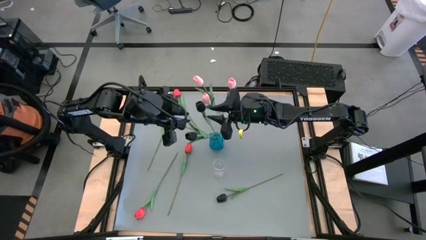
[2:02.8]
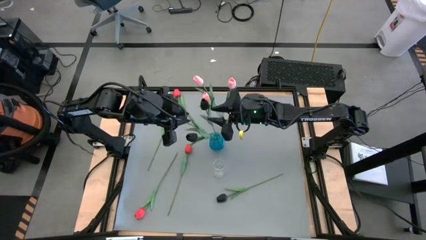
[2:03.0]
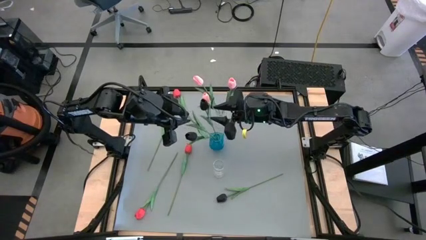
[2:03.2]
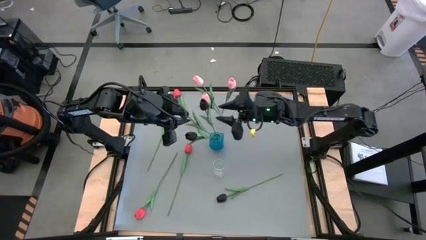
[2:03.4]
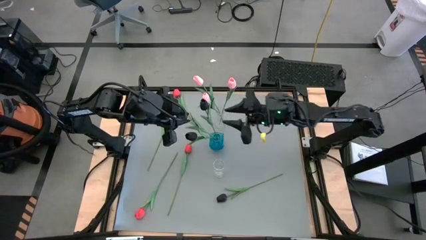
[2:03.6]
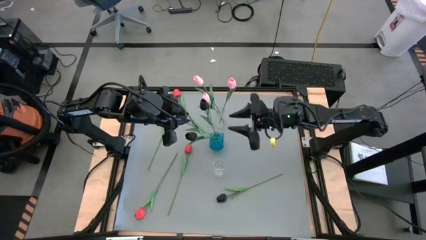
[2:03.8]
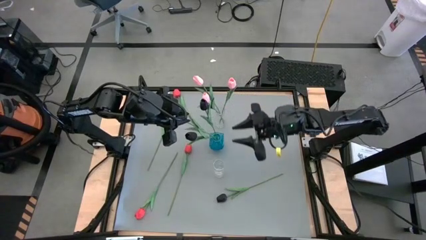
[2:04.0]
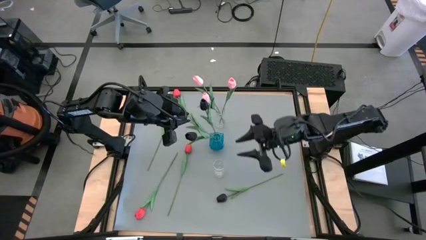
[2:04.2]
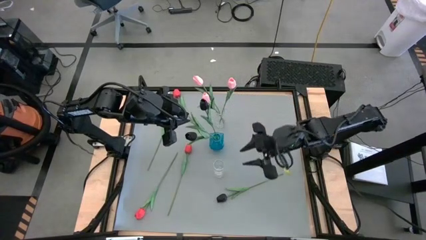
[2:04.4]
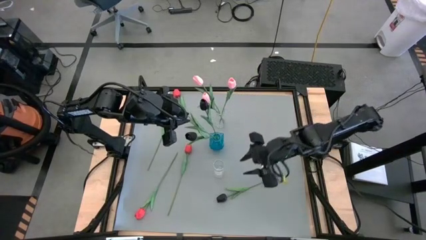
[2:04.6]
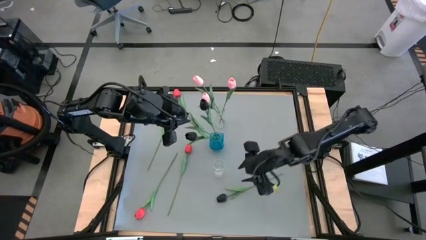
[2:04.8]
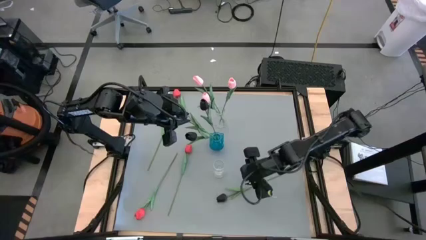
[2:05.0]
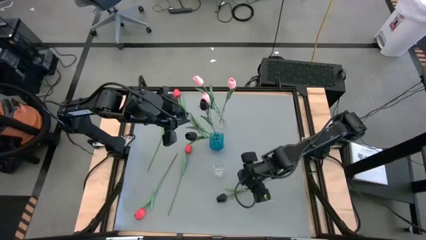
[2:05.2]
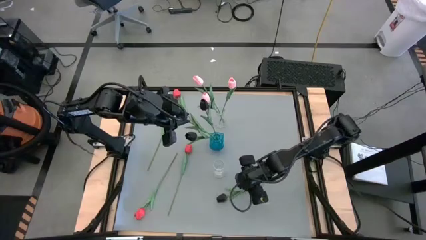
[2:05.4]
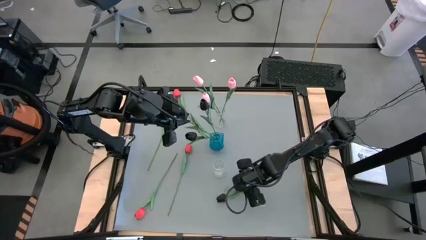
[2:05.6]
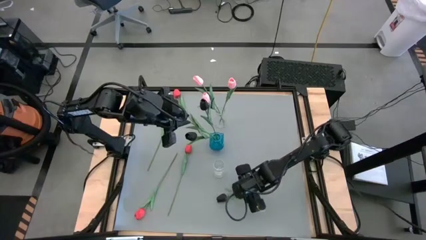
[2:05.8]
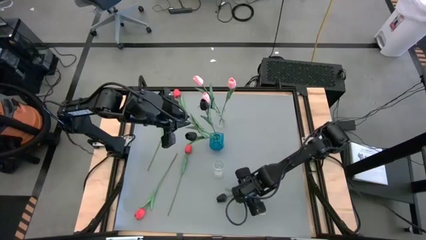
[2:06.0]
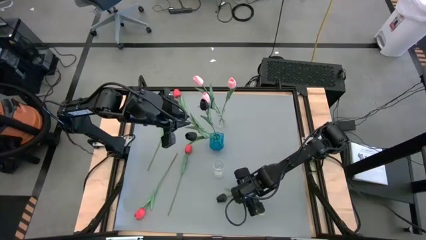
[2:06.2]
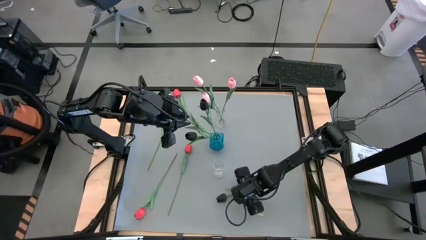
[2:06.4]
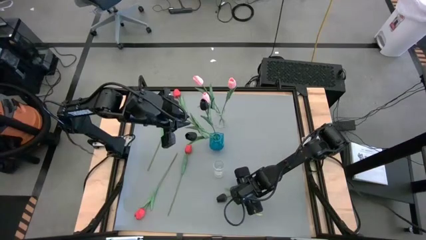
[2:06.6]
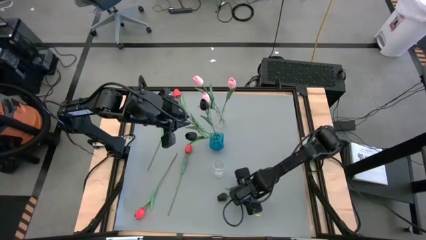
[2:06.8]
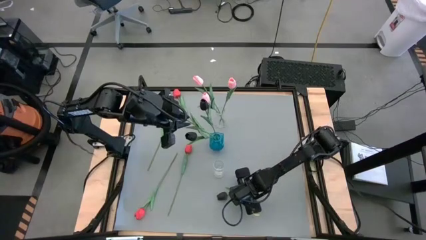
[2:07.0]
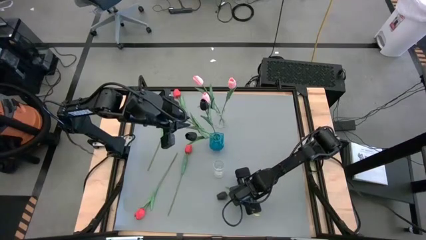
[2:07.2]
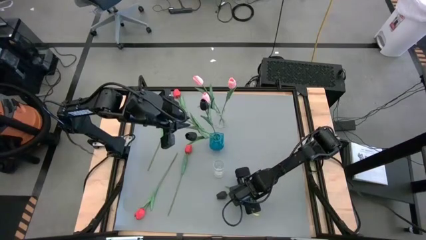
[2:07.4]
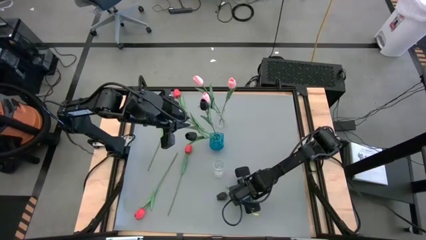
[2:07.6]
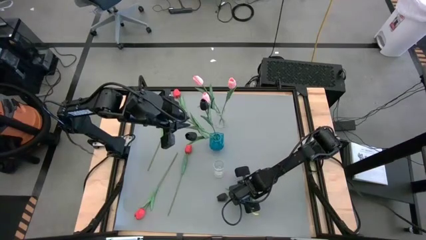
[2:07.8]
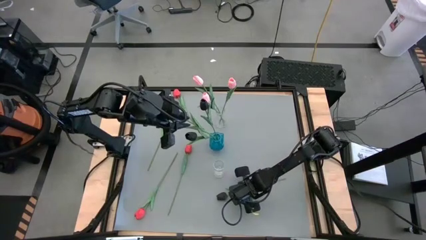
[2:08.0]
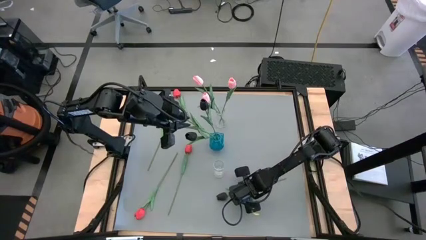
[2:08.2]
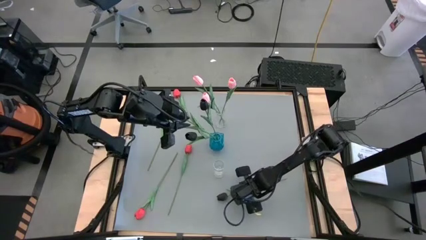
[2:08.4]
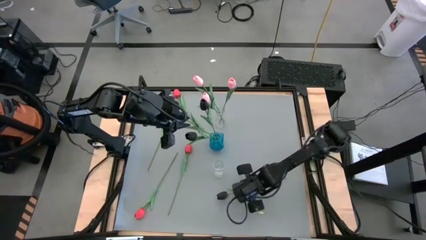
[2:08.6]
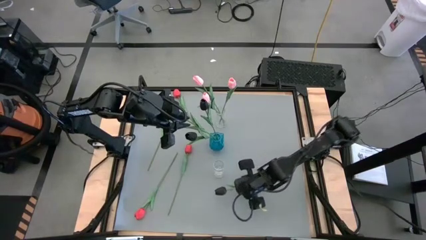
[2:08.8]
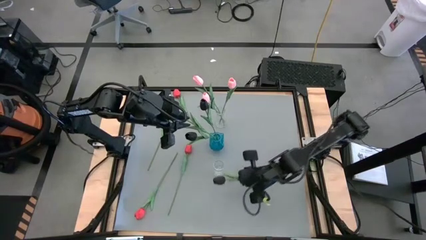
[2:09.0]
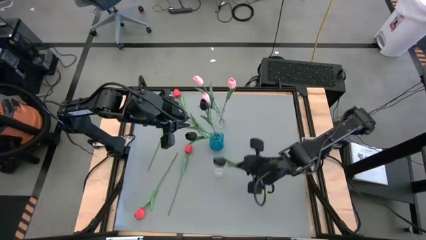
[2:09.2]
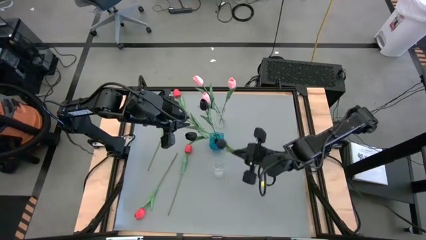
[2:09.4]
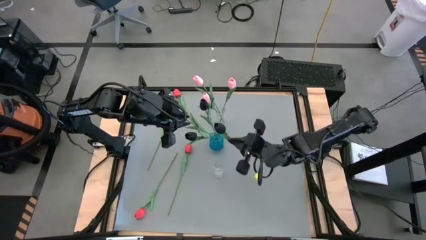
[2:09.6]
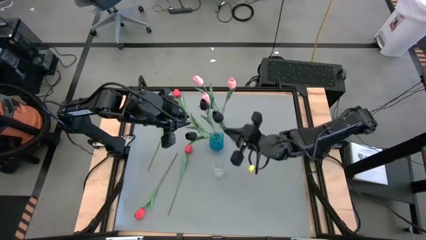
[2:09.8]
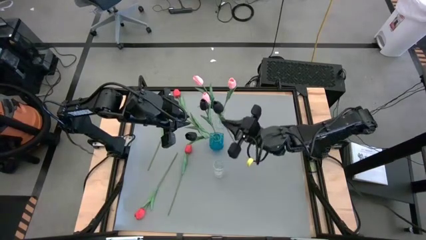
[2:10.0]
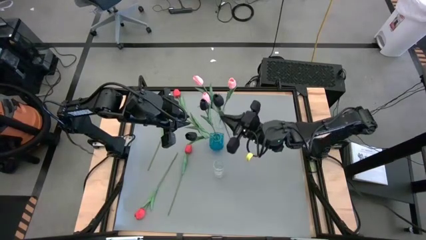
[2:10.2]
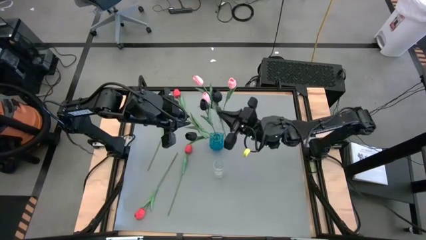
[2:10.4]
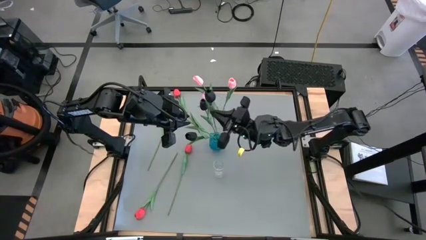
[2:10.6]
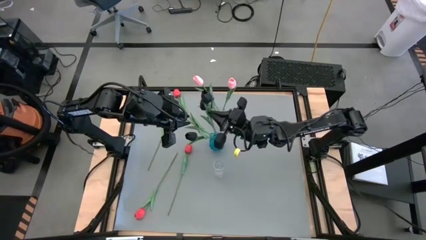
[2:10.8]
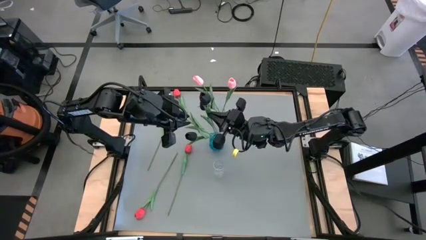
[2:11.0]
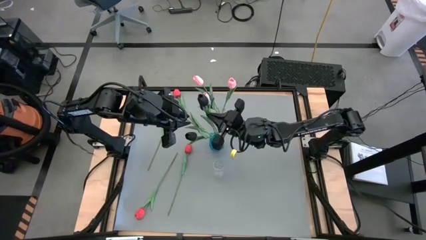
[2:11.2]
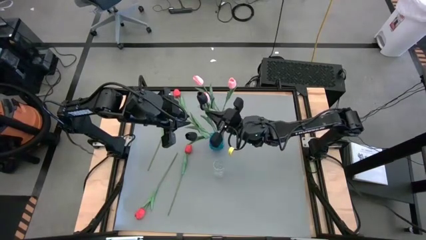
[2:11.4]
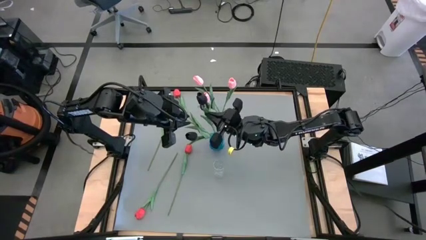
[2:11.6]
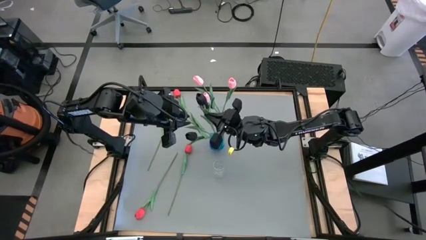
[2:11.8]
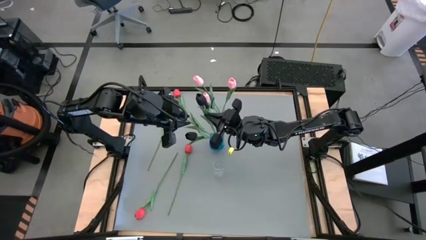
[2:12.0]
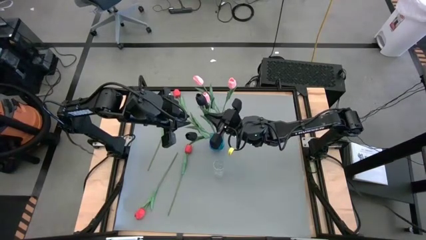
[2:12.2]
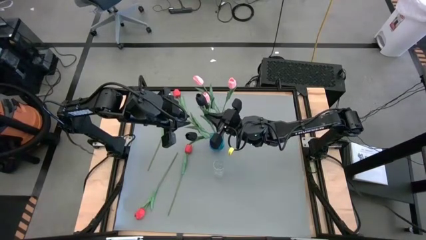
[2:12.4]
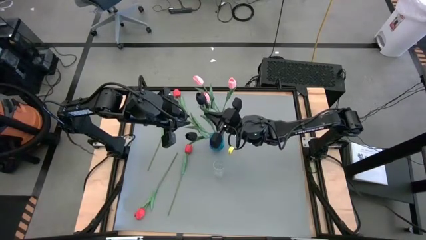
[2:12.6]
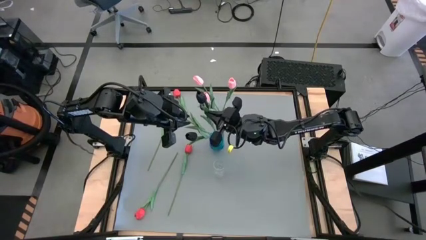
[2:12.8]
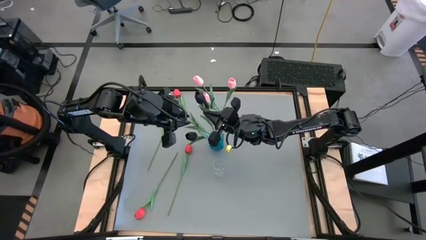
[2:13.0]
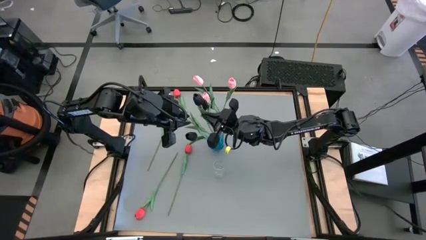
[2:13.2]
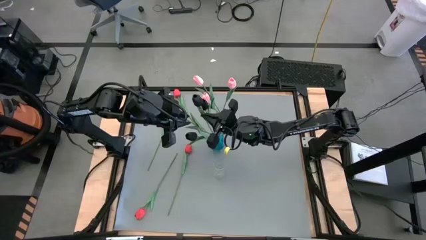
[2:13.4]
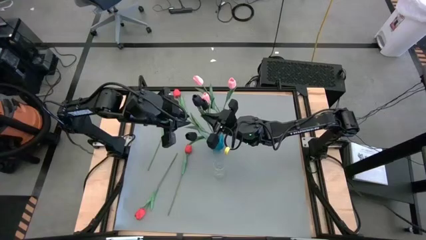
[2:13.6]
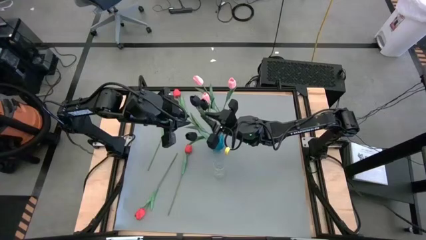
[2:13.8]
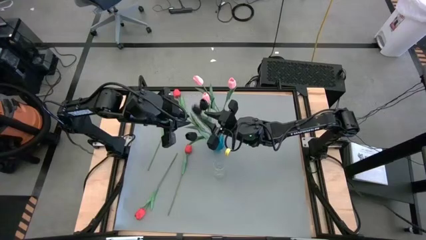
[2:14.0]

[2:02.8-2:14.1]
Task: Sort flowers into vase by color
Put the black tulip into the blue vase
